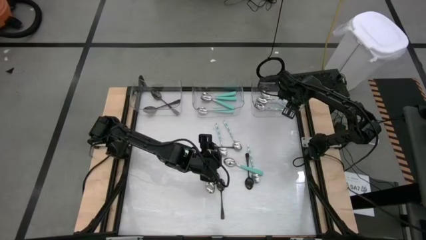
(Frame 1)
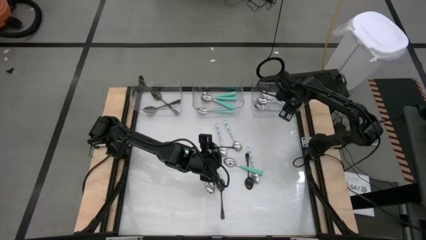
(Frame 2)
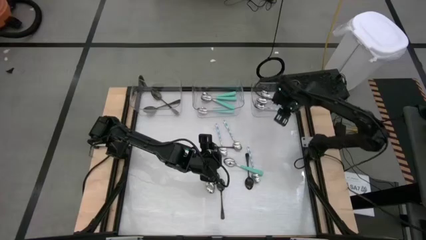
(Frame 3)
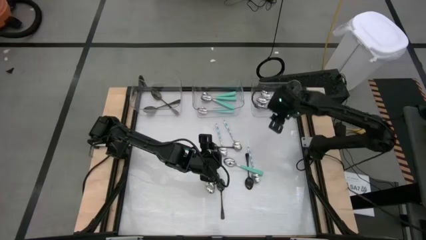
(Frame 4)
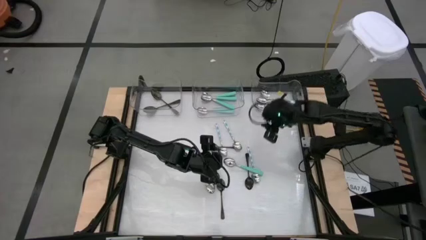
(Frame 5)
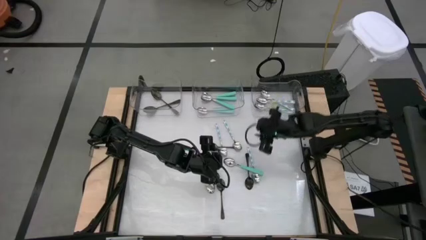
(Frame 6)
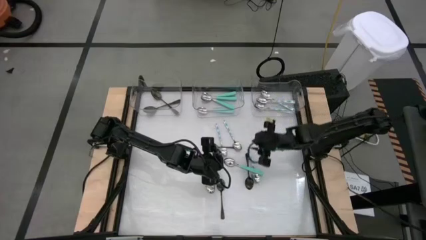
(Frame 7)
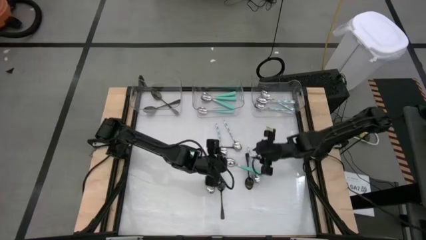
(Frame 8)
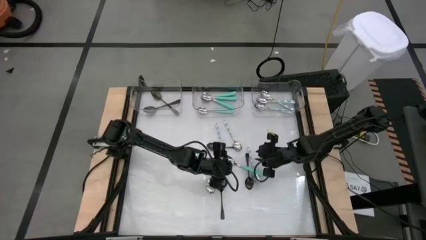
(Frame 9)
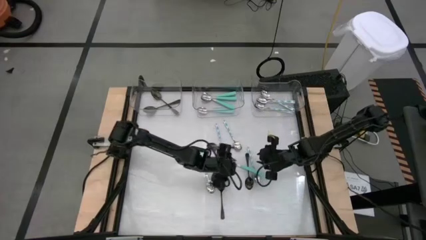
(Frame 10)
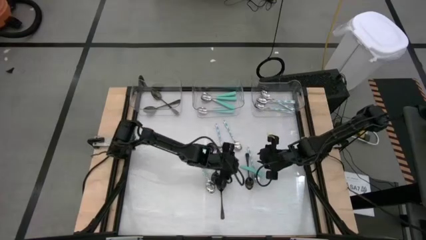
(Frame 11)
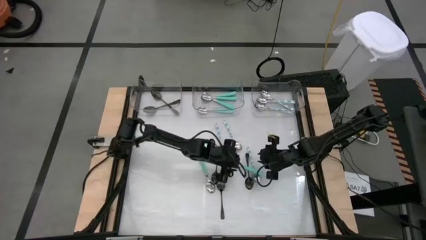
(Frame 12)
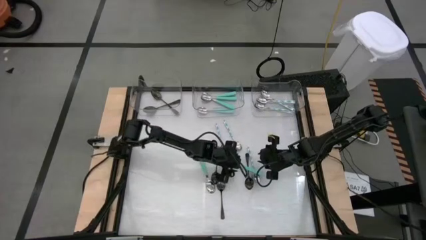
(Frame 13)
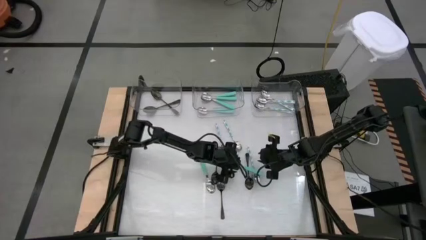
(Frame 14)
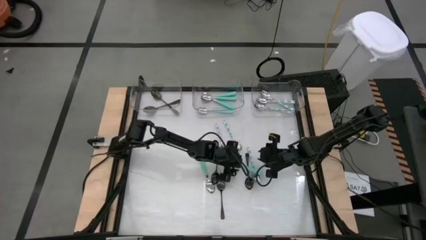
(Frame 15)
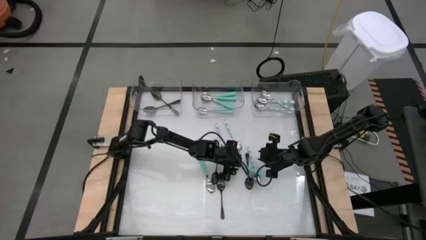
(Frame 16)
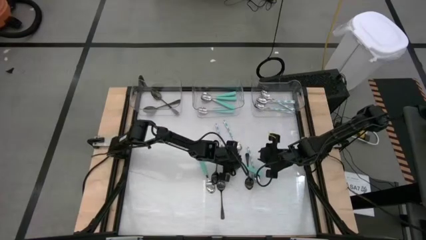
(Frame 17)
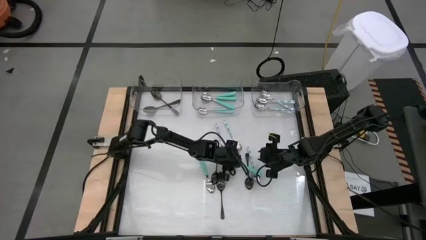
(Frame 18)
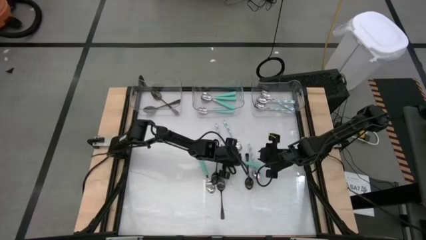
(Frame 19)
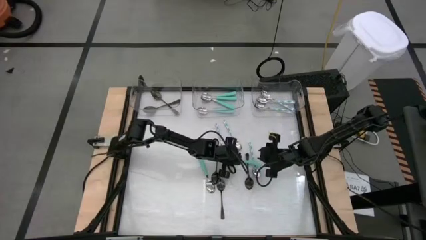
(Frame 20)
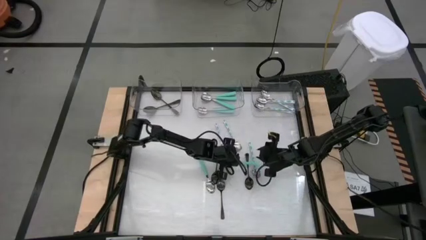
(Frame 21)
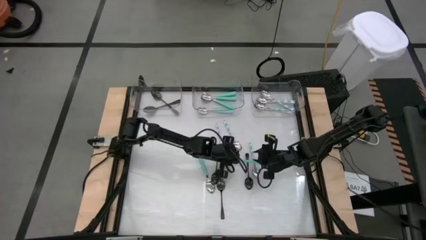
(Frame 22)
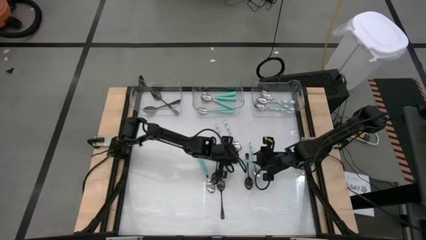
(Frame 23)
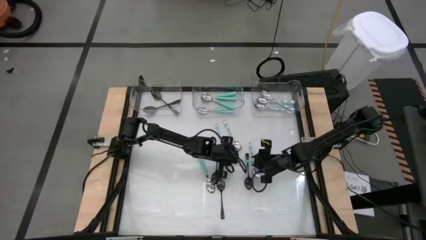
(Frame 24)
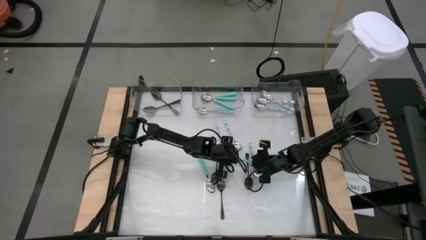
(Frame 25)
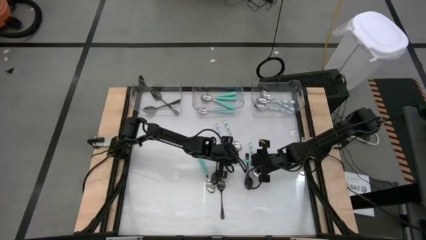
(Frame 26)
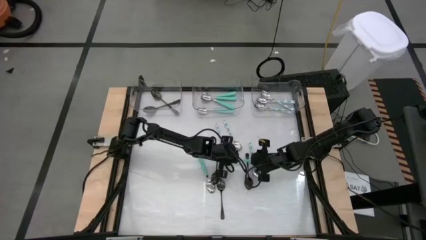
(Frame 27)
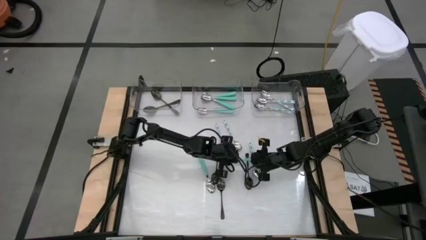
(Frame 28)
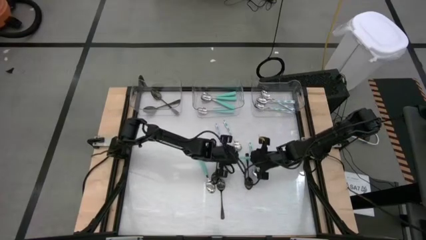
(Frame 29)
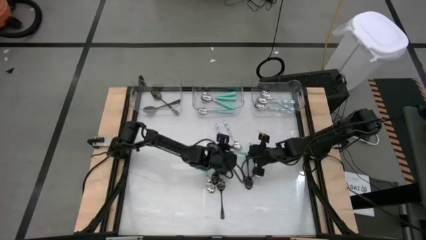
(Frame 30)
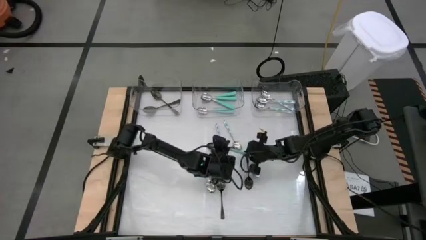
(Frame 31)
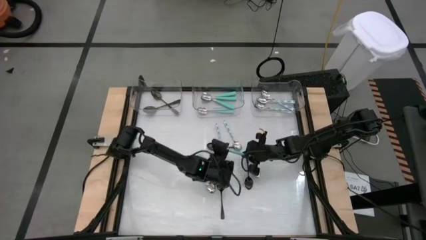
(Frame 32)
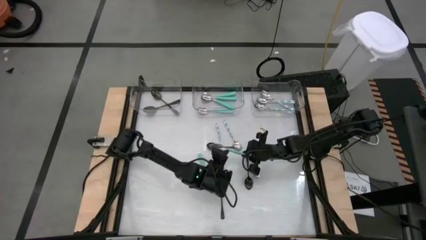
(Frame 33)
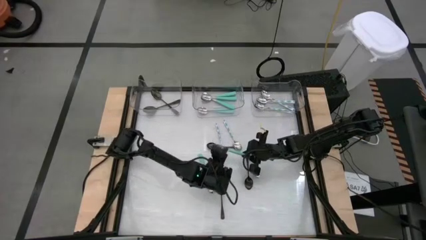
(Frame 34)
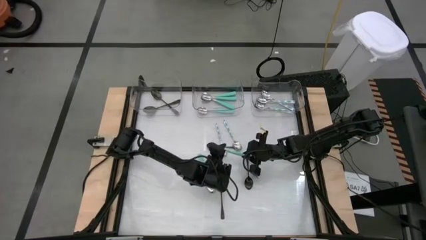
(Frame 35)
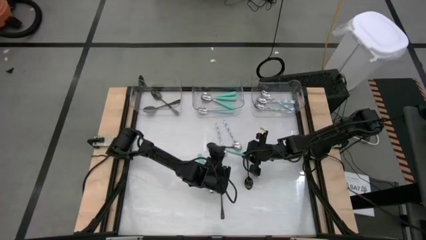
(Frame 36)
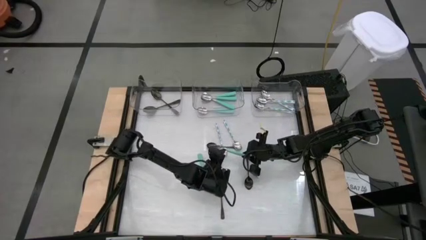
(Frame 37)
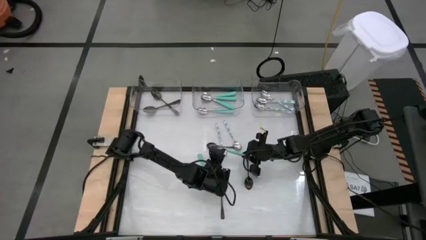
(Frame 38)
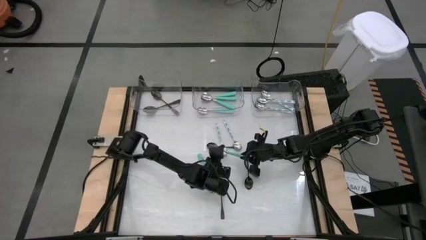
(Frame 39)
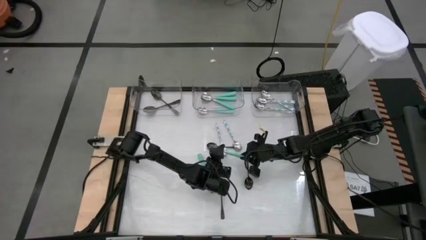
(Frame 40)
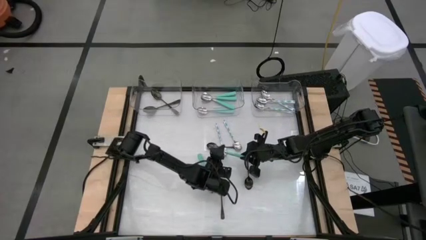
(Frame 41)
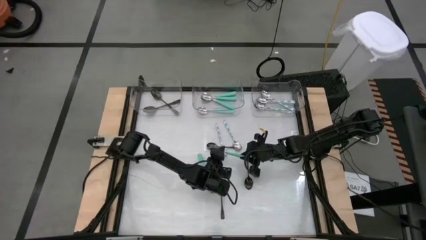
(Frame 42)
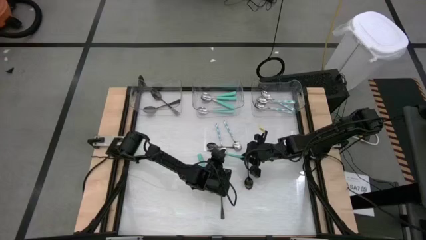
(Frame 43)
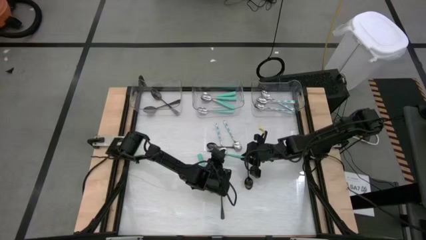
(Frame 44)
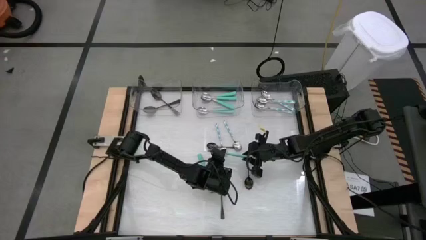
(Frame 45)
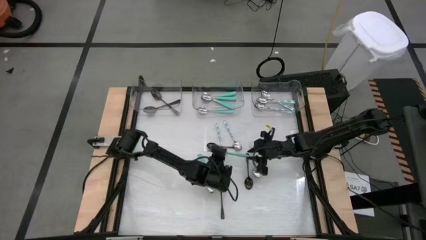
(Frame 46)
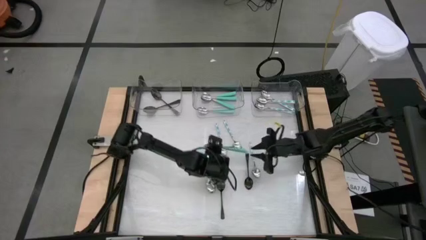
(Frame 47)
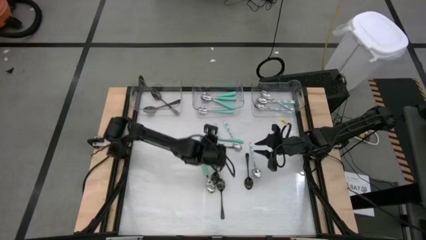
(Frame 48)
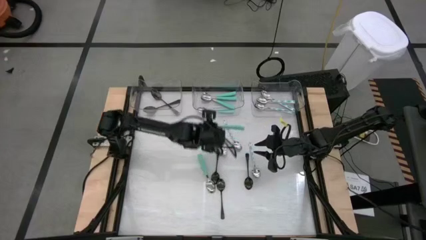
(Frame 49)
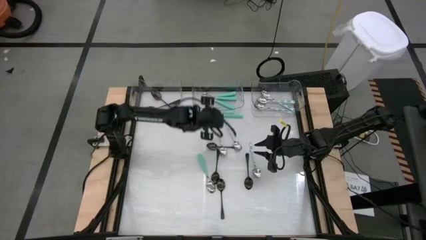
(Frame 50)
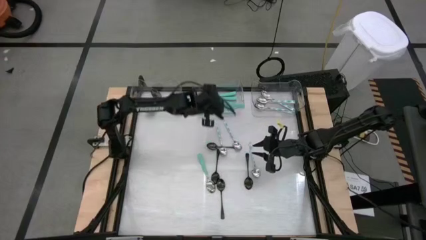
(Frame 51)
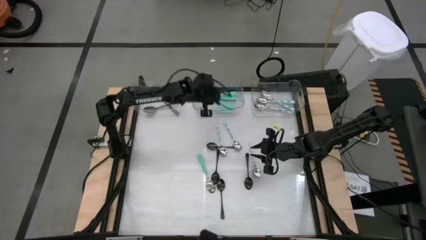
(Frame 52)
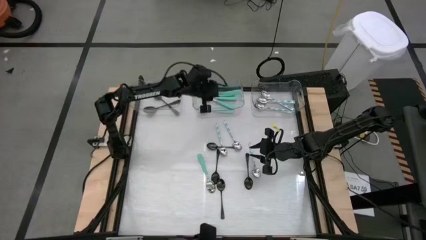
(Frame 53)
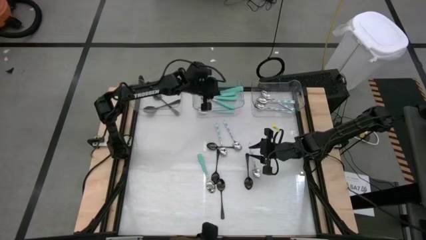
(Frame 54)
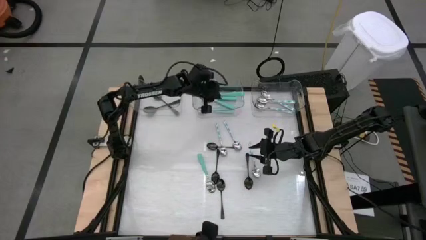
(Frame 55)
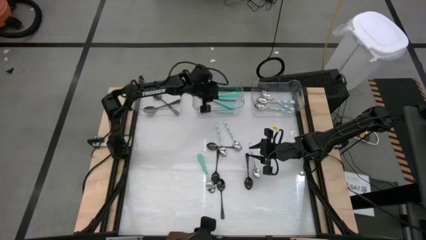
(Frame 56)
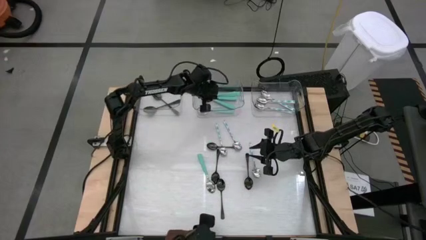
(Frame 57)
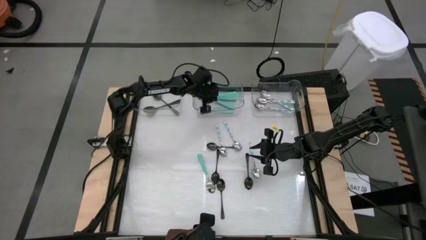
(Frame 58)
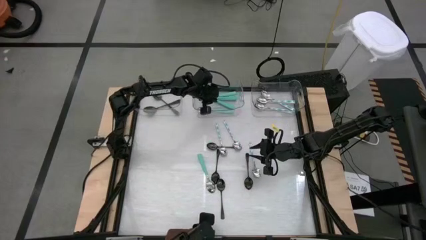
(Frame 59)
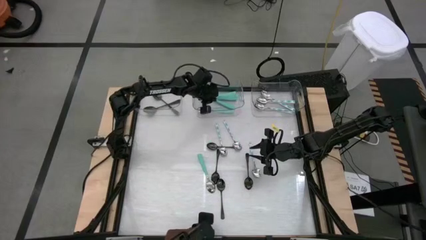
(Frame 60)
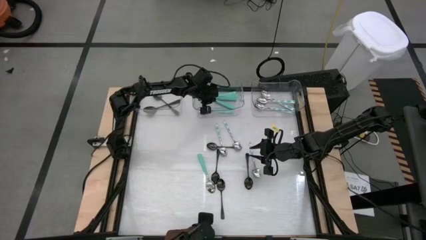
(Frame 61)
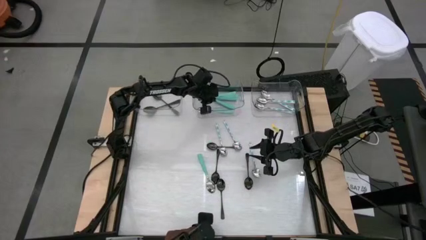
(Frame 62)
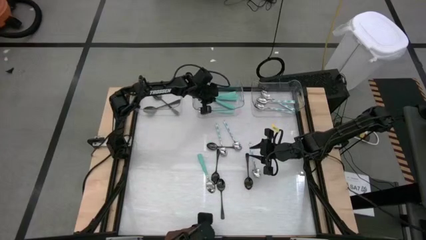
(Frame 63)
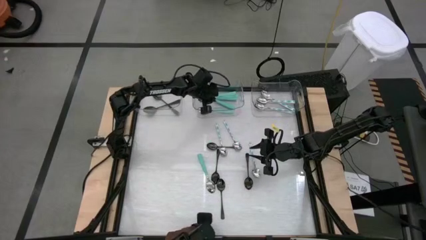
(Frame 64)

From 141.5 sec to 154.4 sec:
Task: Sort silverware by color (type)
Put the green spoon into the center transparent bin
